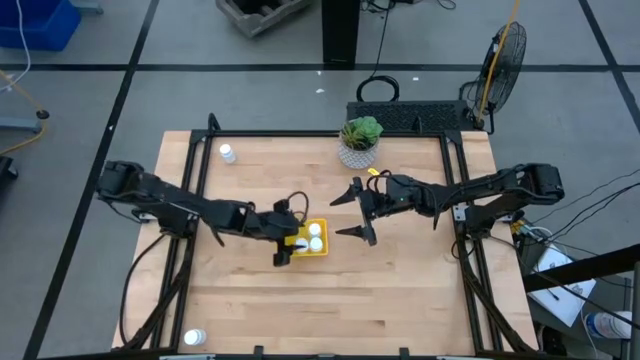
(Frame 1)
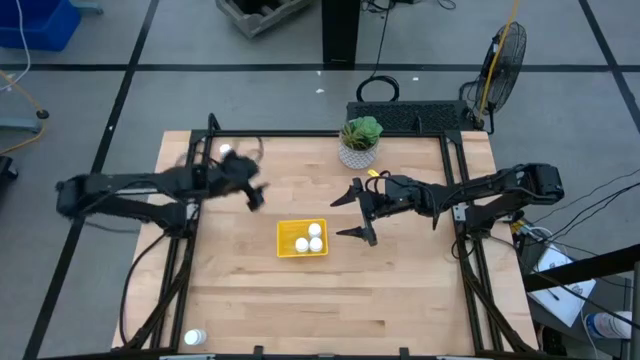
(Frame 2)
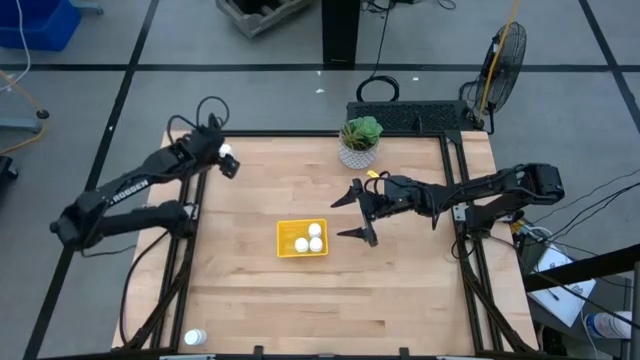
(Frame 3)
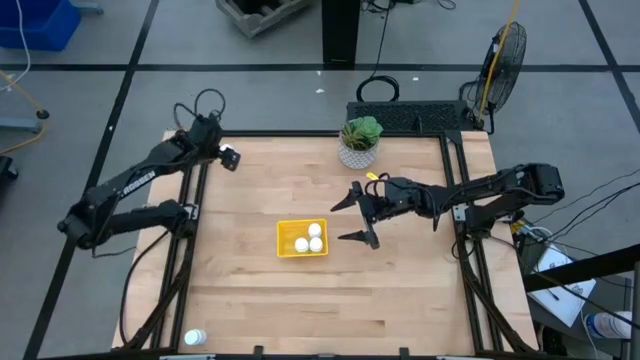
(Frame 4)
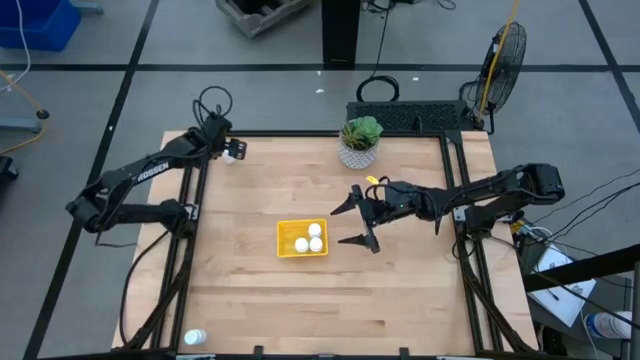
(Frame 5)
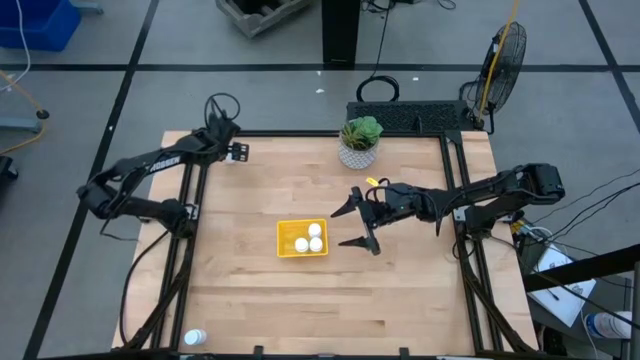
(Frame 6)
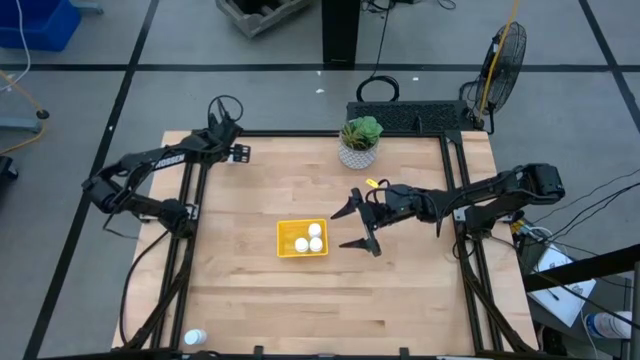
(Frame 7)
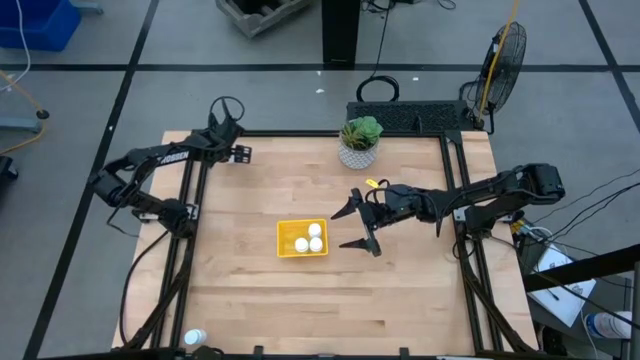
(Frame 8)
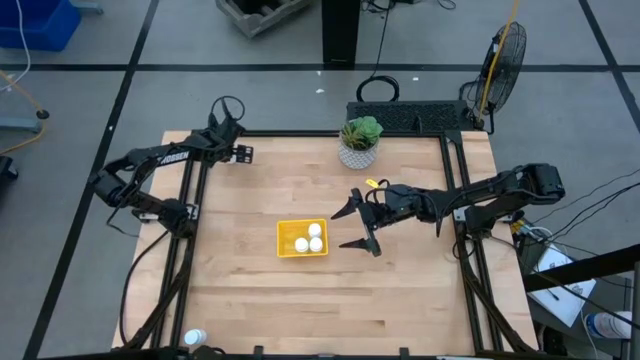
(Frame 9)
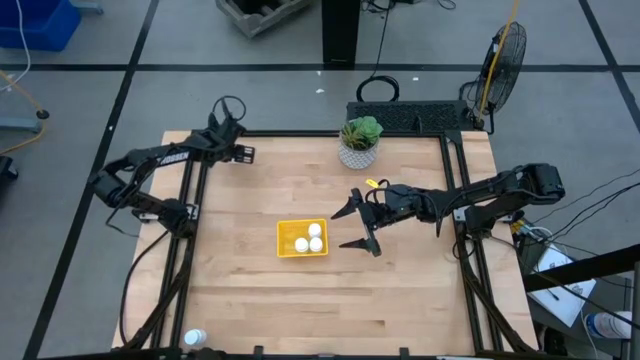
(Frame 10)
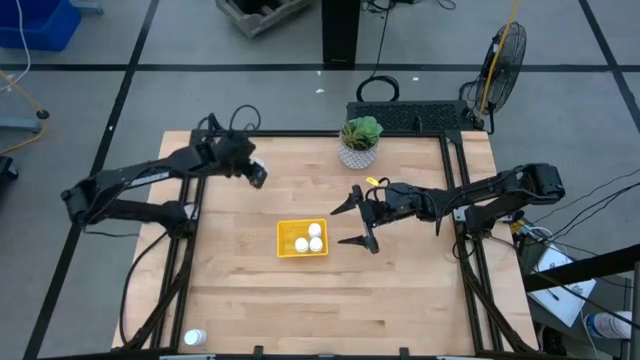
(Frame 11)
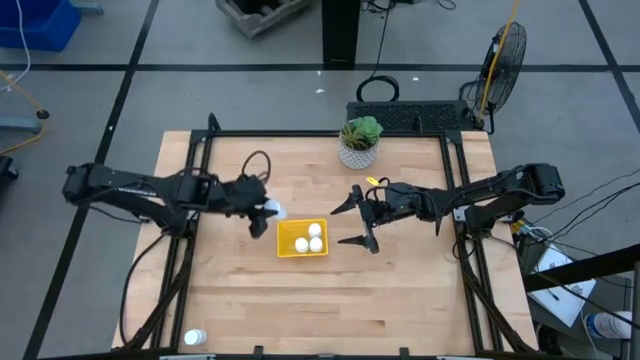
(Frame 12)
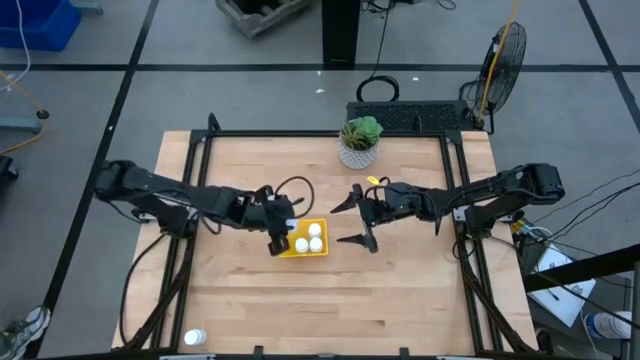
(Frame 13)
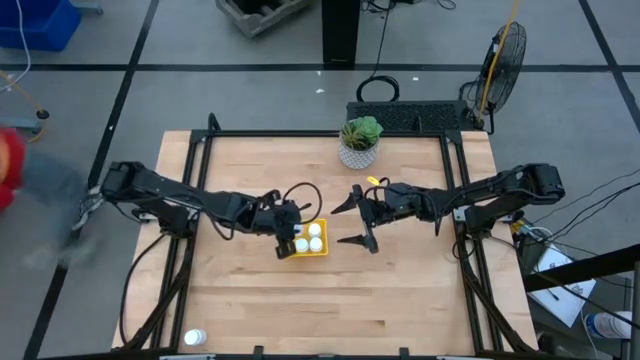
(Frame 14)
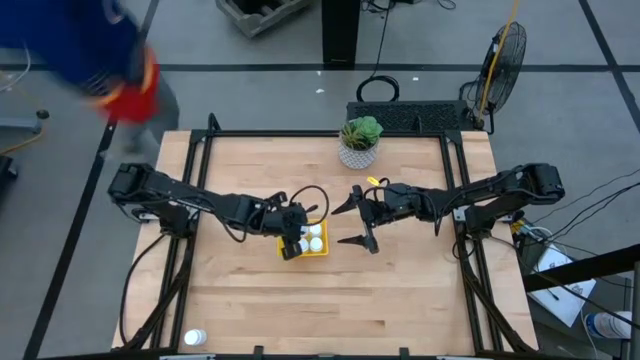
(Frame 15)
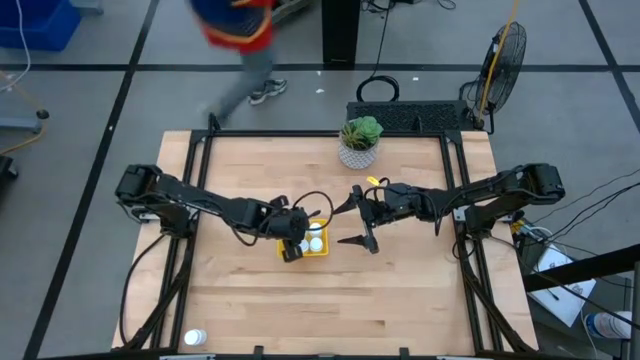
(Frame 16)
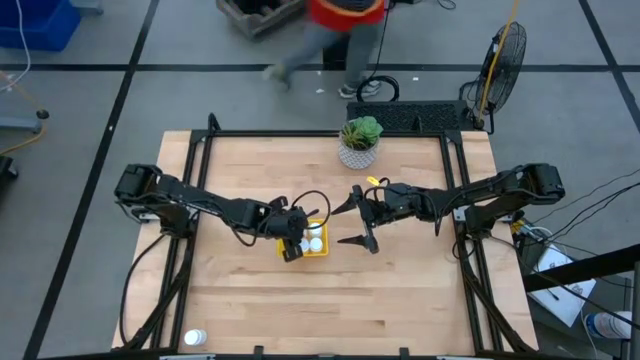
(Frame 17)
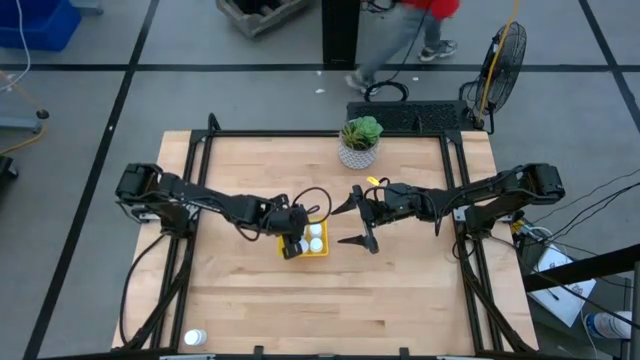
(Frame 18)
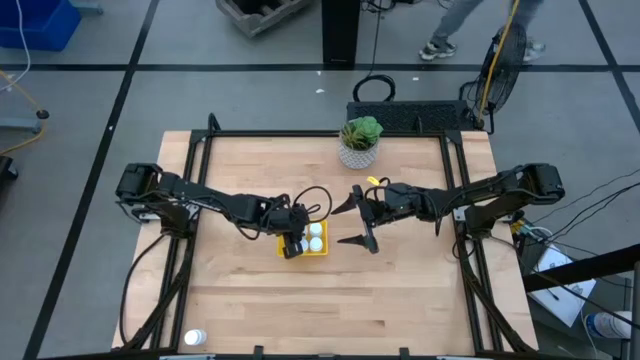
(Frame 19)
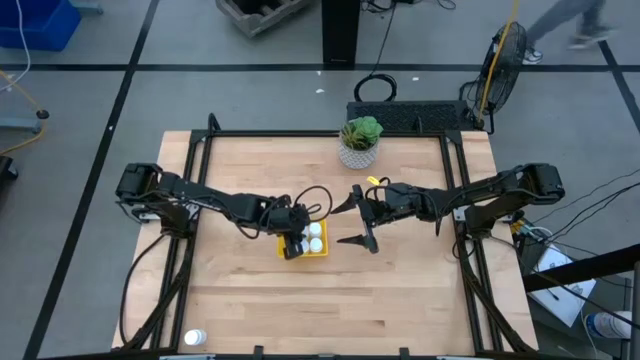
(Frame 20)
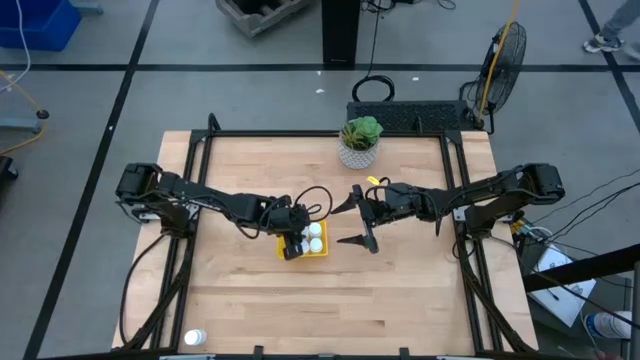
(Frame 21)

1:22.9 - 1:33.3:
Task: Pick and place pill bottles into a basket
Put the white pill bottle into the yellow bin

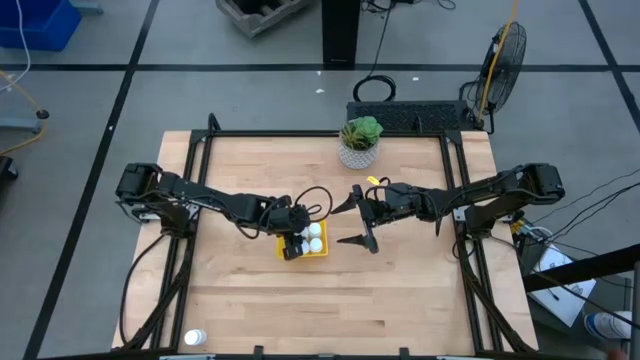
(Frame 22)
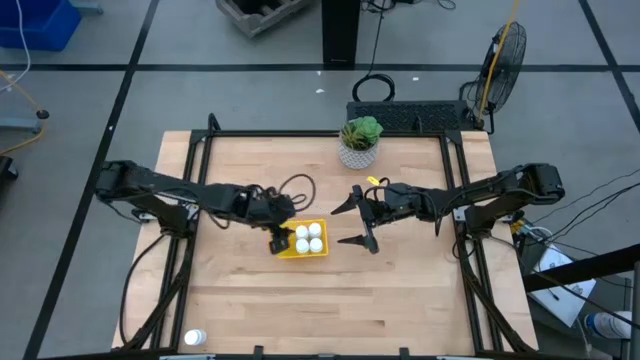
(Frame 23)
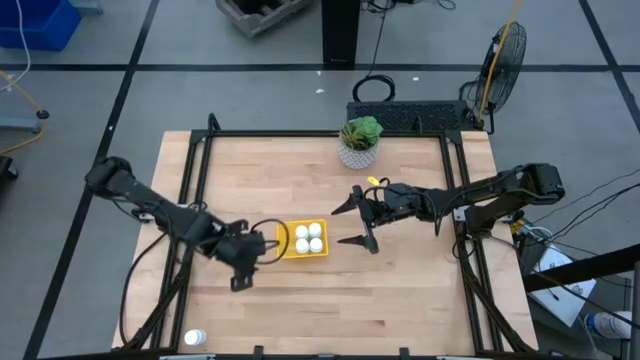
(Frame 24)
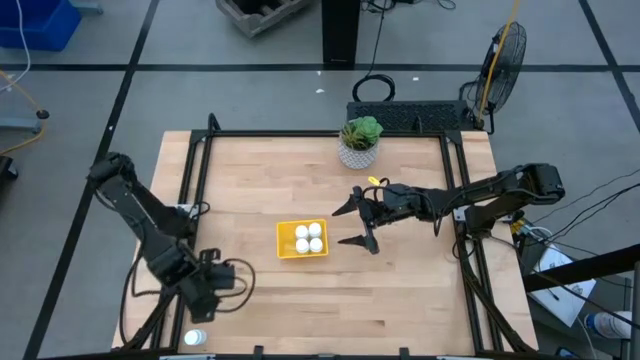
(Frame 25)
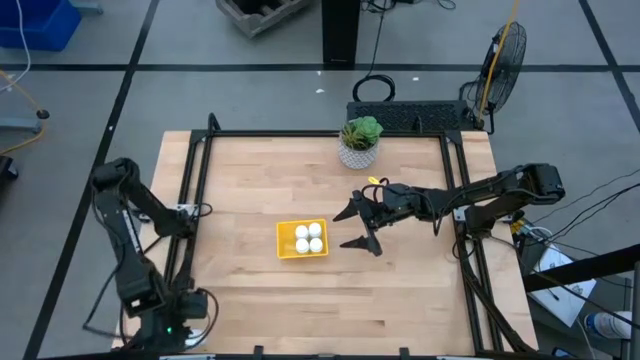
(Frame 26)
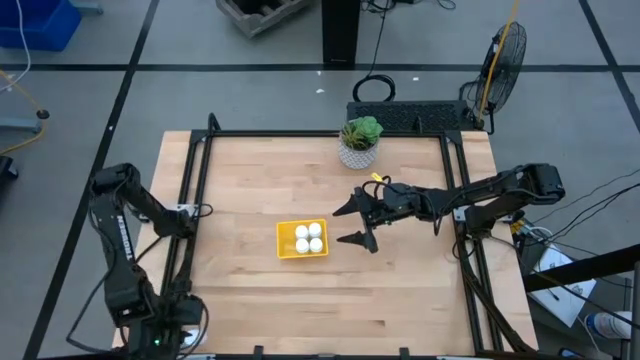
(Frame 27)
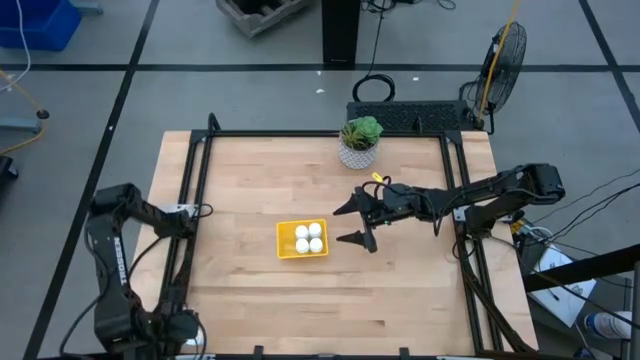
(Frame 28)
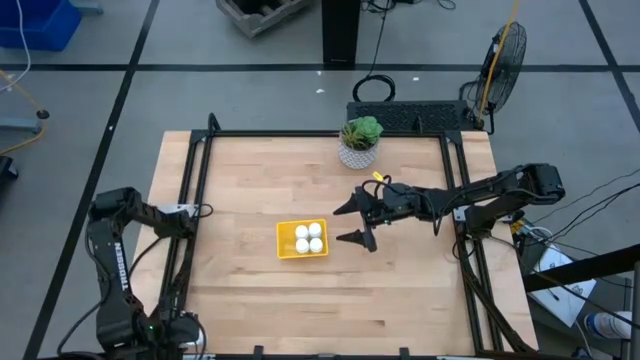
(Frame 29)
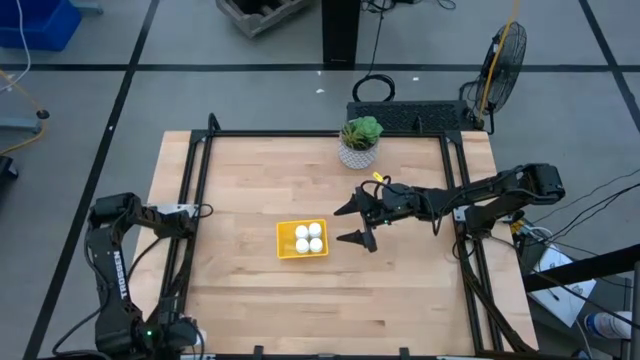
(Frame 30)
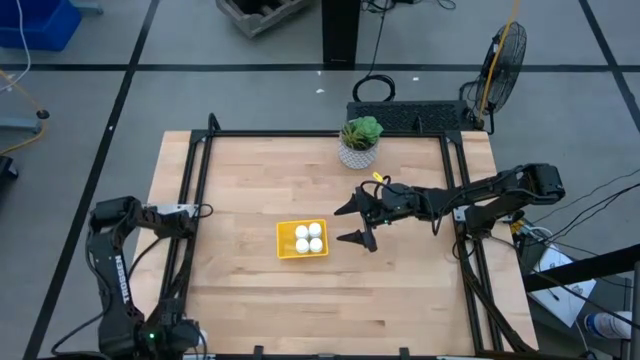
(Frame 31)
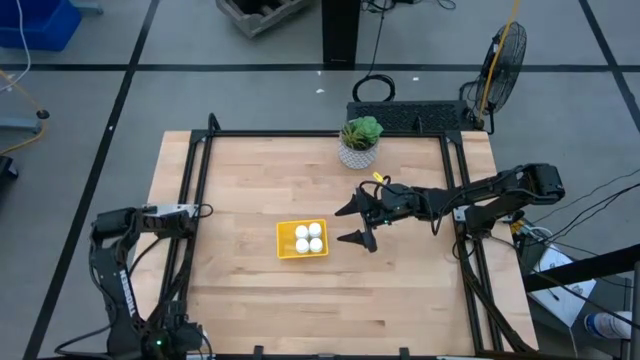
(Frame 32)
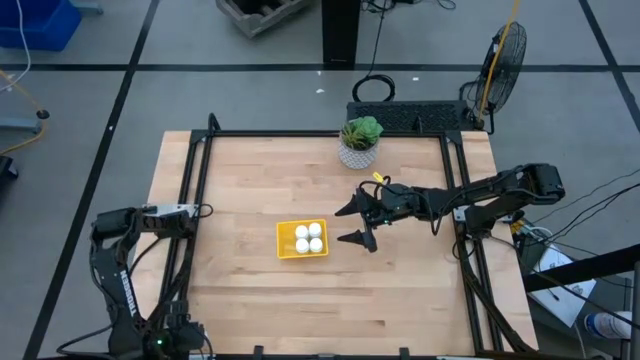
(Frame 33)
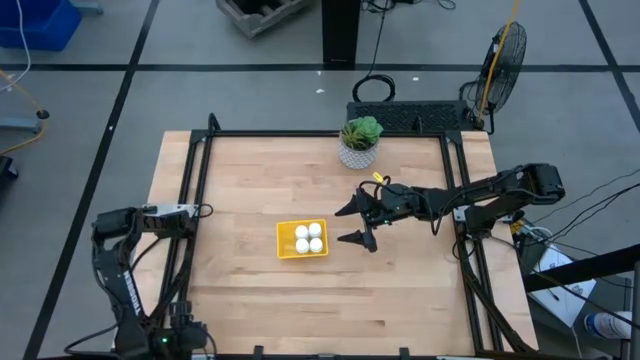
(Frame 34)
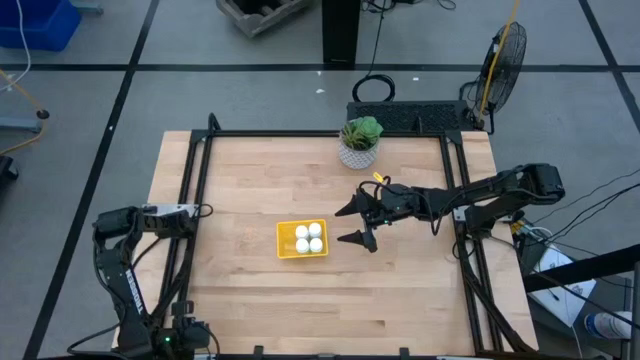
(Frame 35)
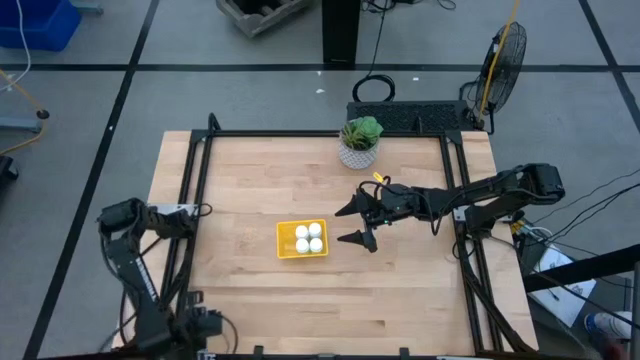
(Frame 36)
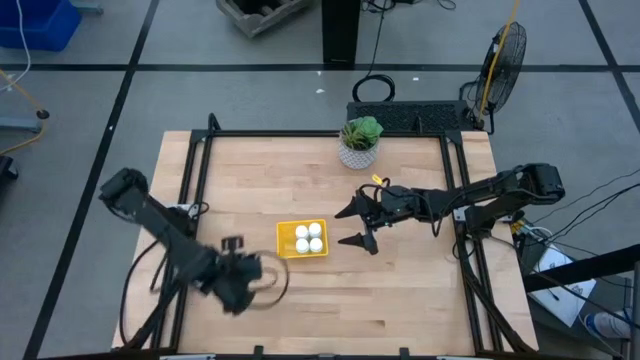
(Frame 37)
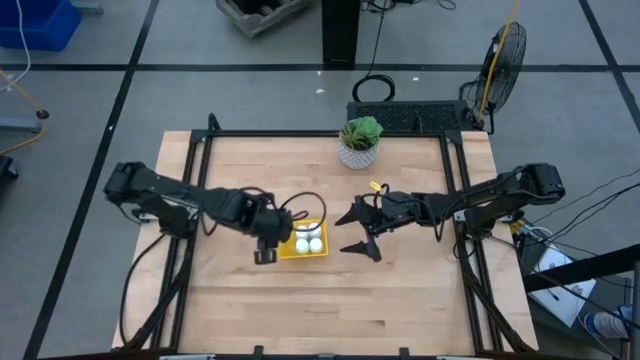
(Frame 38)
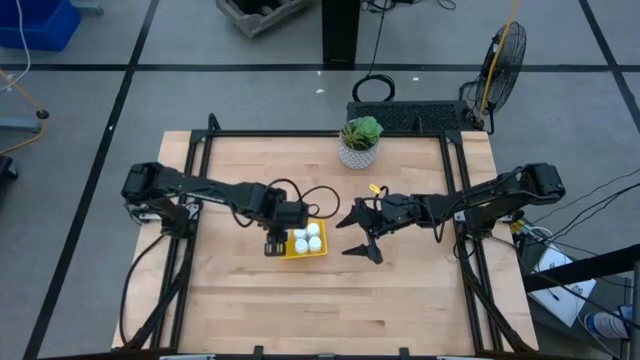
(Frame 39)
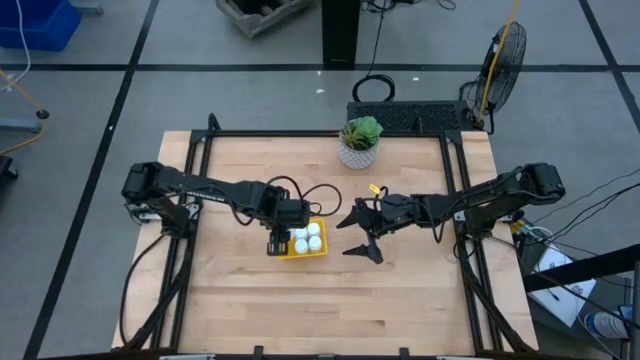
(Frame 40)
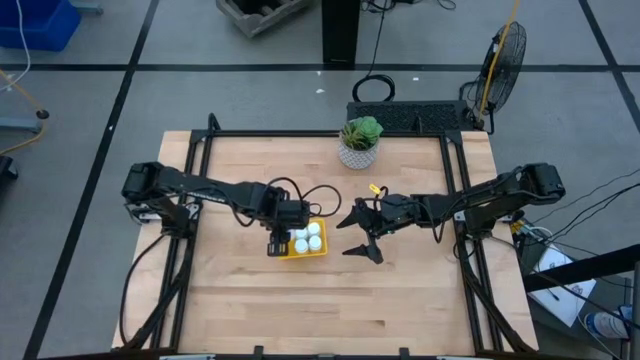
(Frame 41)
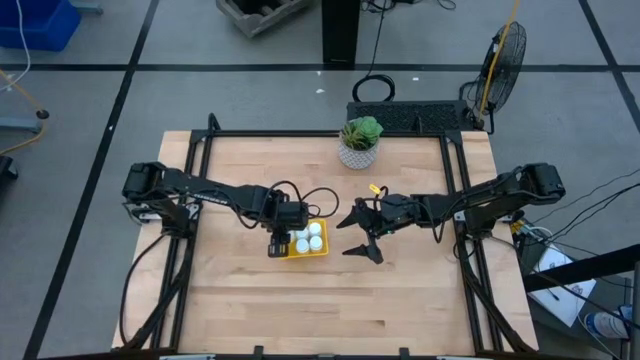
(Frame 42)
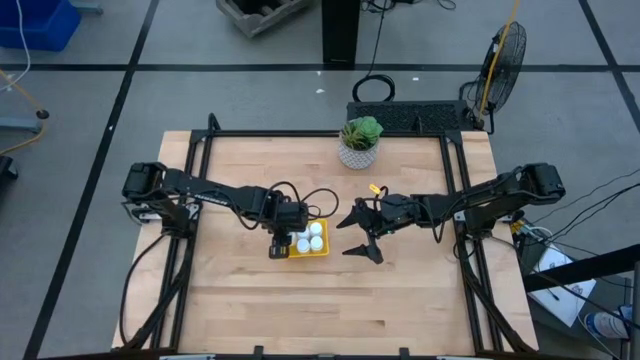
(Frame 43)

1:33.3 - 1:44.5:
Put the white pill bottle into the yellow bin
